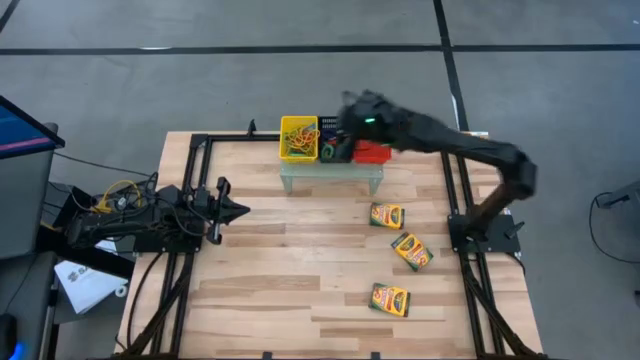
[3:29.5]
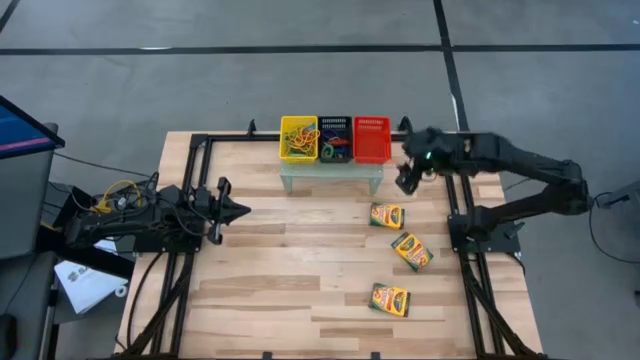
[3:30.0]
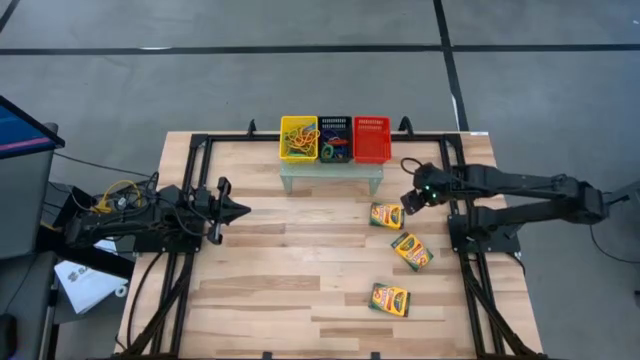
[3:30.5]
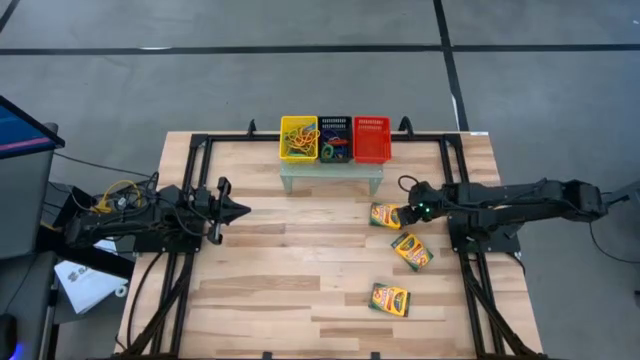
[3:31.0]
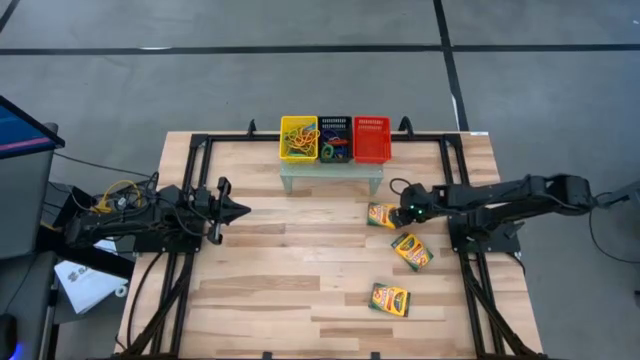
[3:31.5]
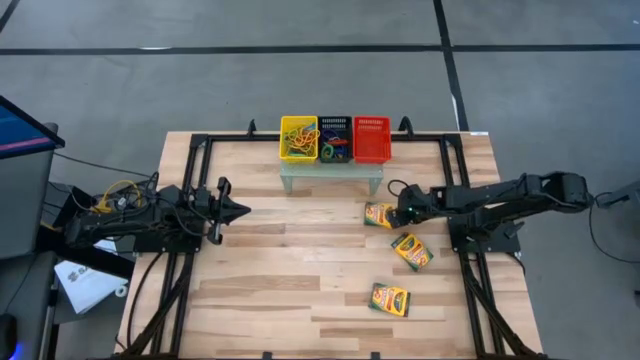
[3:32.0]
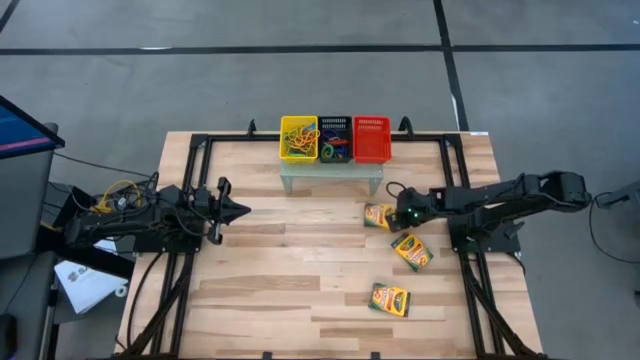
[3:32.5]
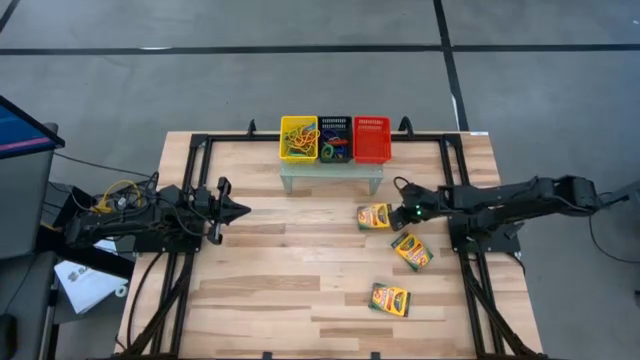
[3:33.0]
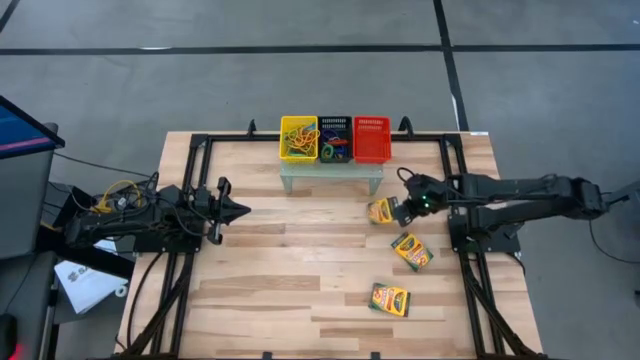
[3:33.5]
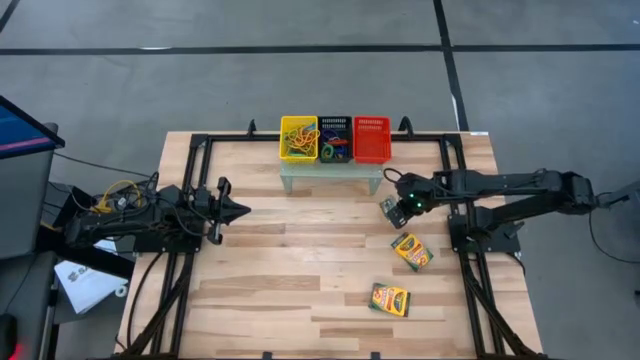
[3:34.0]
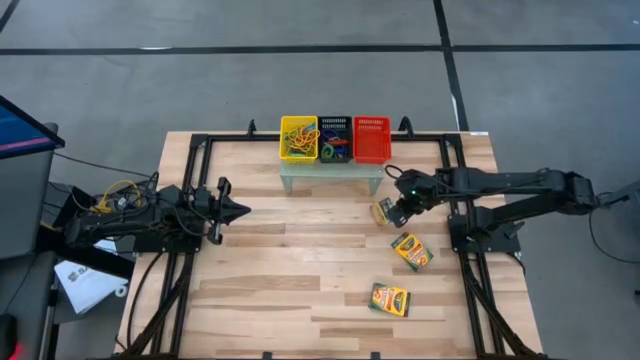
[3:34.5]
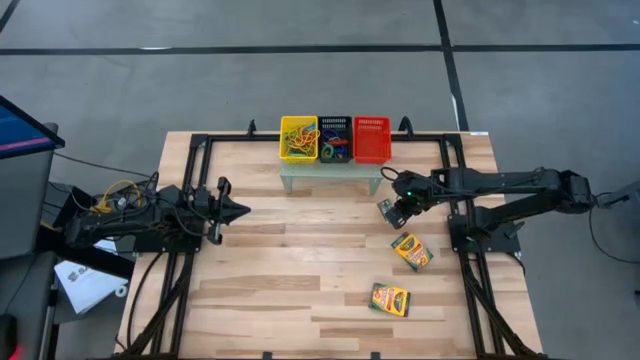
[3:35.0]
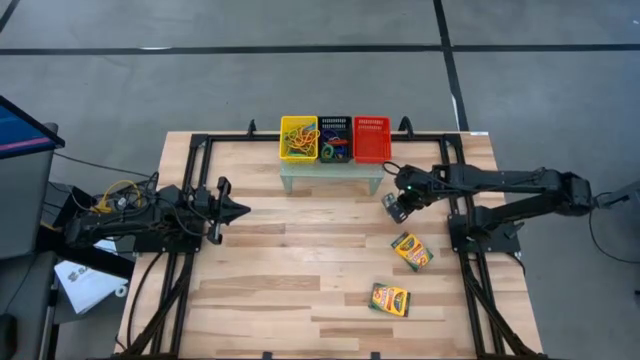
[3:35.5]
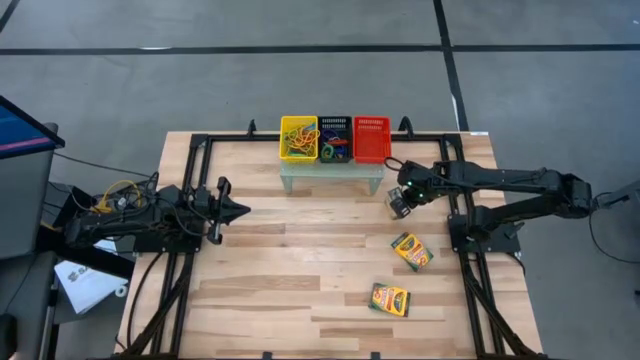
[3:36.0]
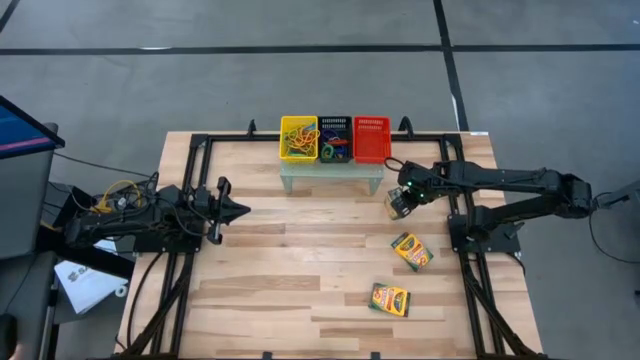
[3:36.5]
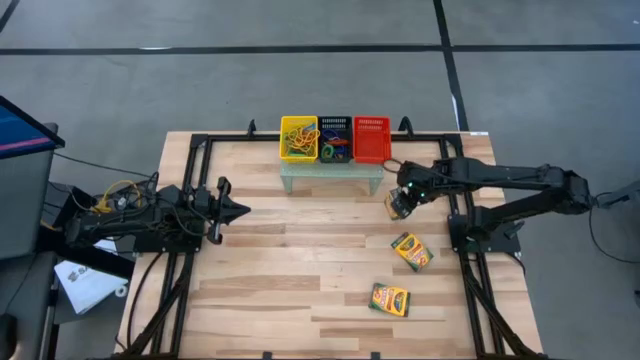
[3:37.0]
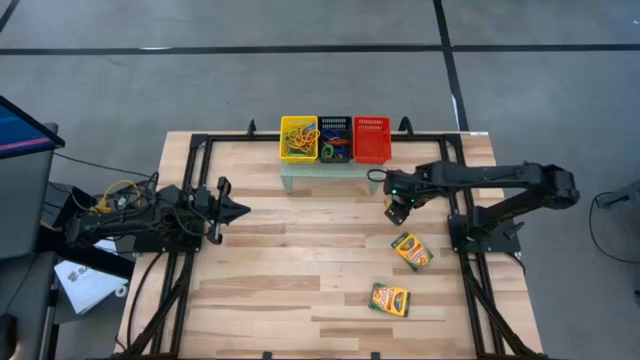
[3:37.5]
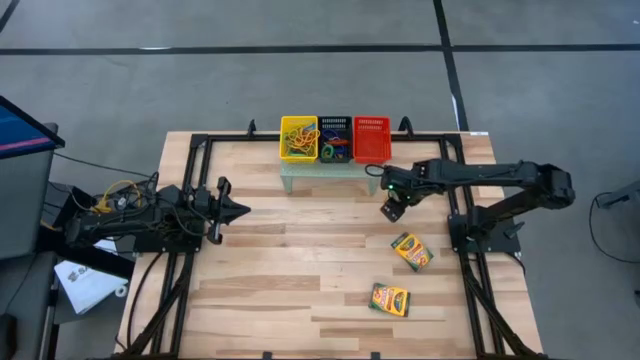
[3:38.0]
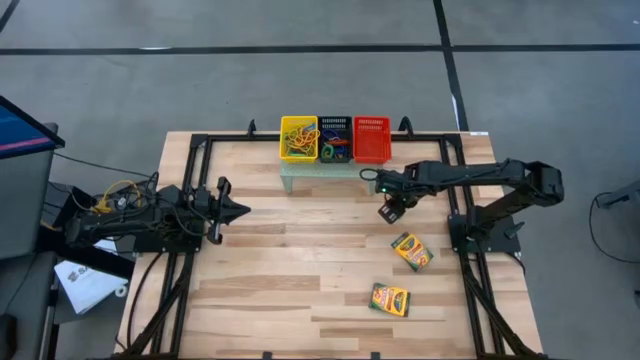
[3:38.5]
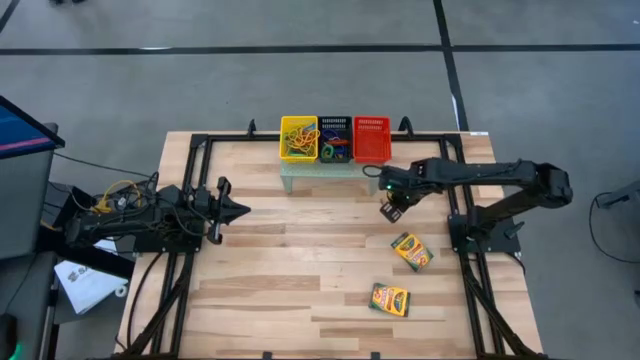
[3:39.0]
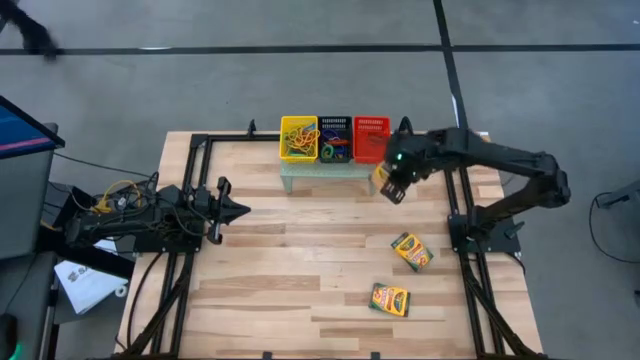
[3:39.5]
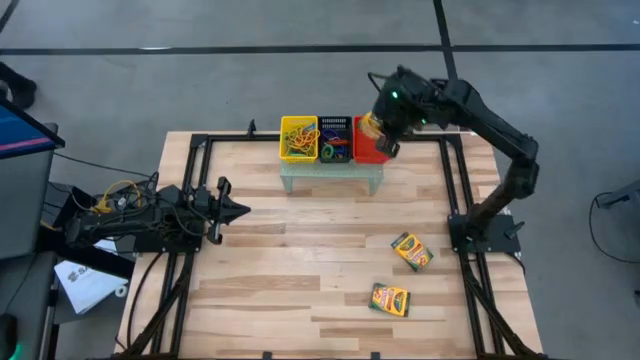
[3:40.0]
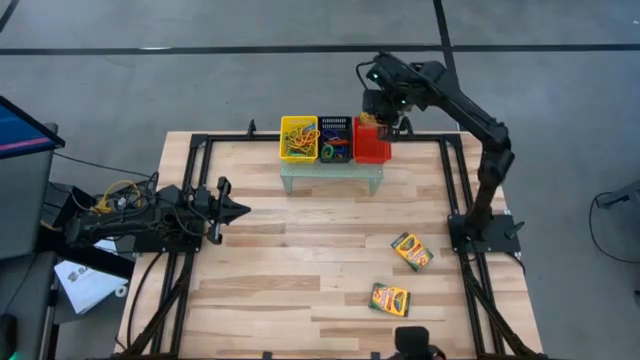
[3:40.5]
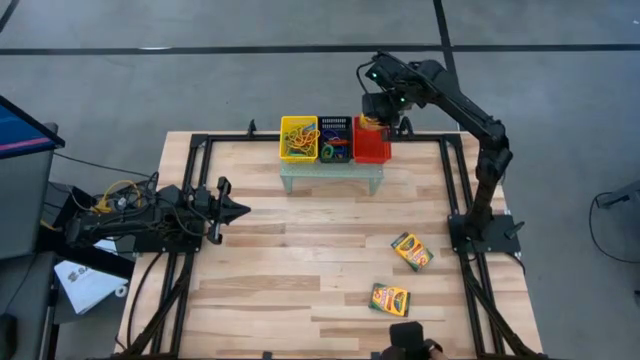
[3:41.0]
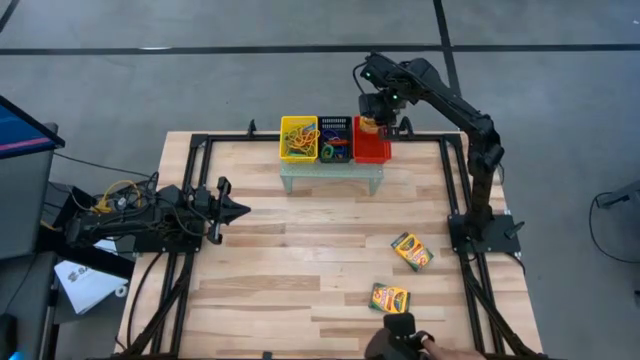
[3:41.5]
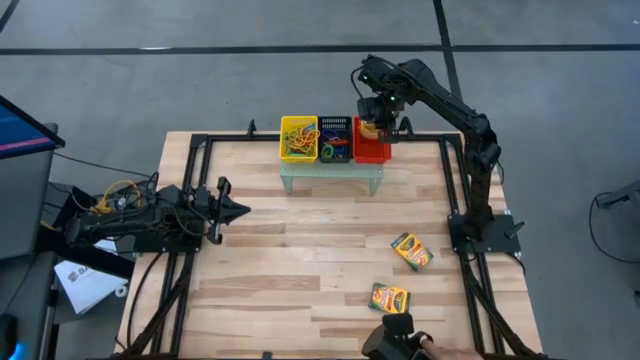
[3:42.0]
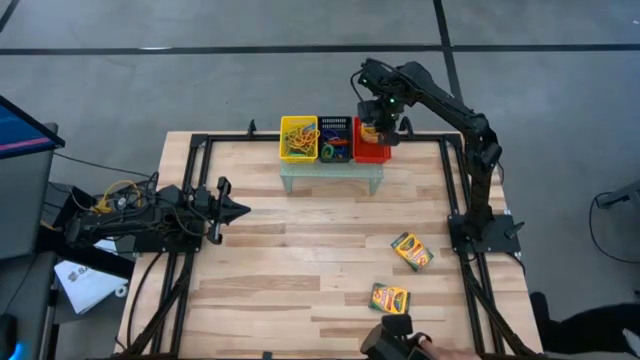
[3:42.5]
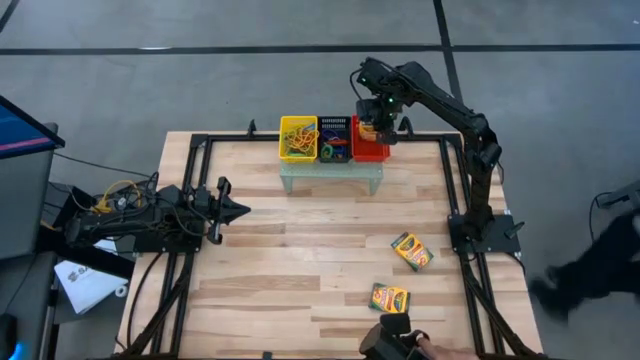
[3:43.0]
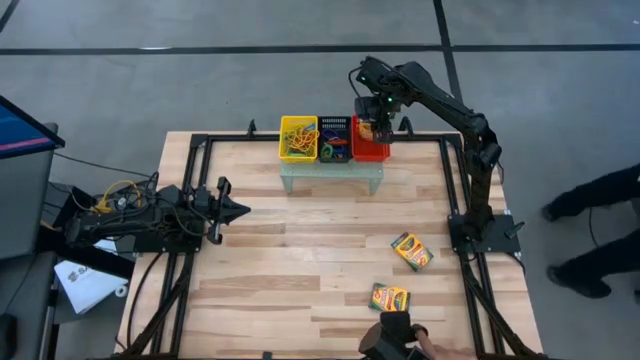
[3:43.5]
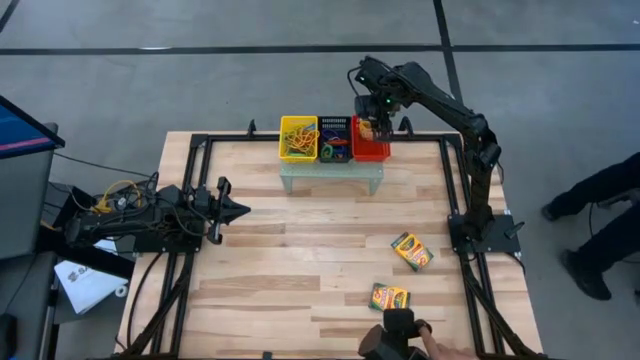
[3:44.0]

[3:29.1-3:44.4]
Task: Pick & Place Office Desk Supplies
Put the top yellow crayon box into the red bin on the shelf

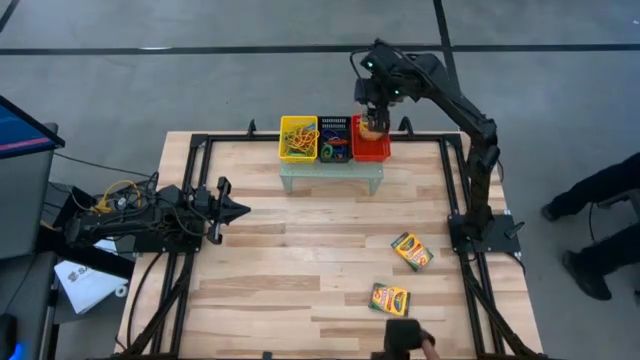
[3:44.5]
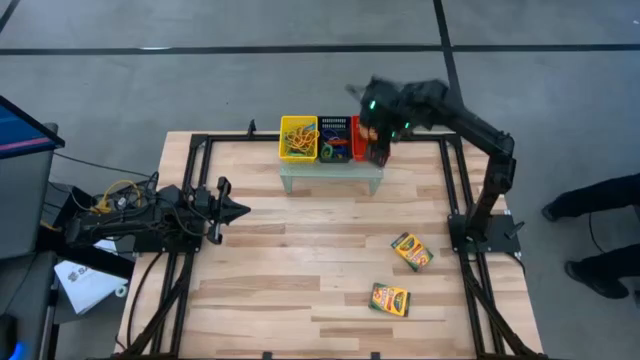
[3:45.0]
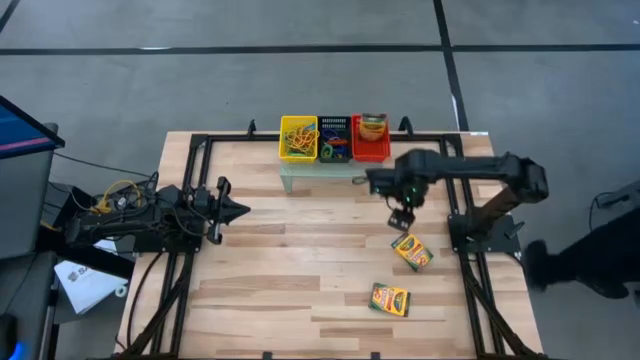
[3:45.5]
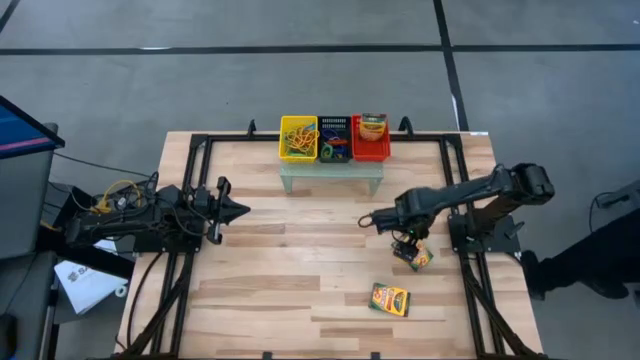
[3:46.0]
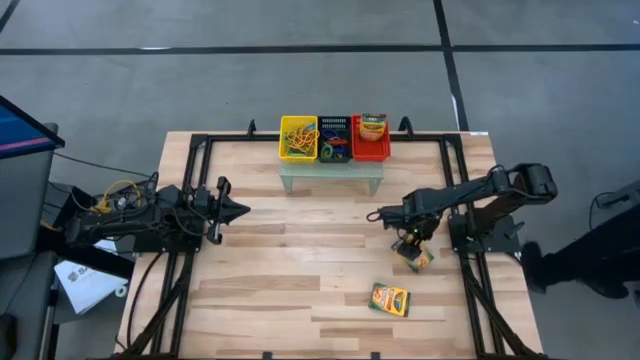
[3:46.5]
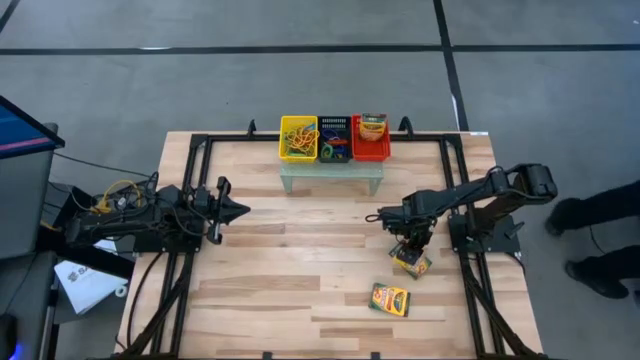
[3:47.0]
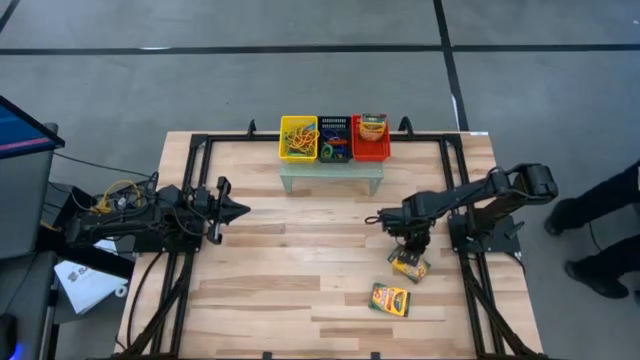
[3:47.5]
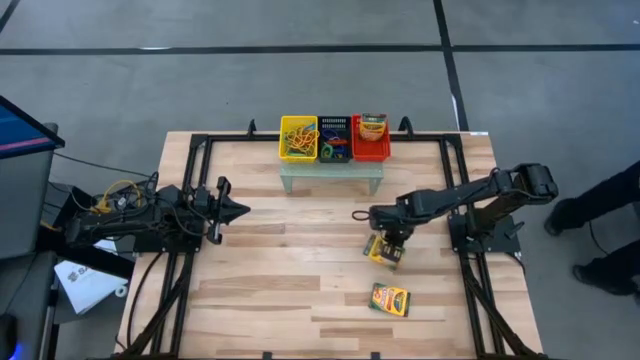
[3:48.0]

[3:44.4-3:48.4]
Put the top yellow crayon box into the red bin on the shelf

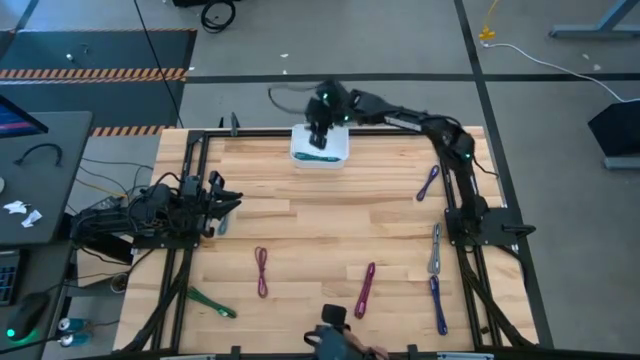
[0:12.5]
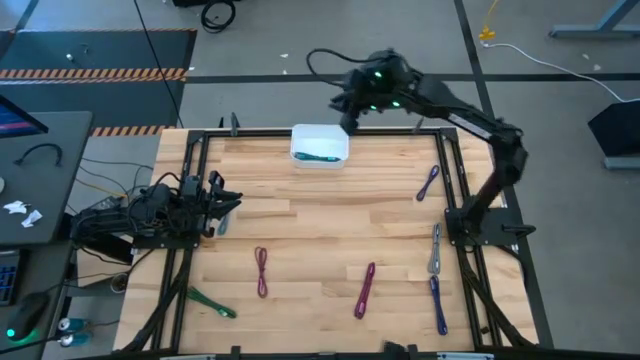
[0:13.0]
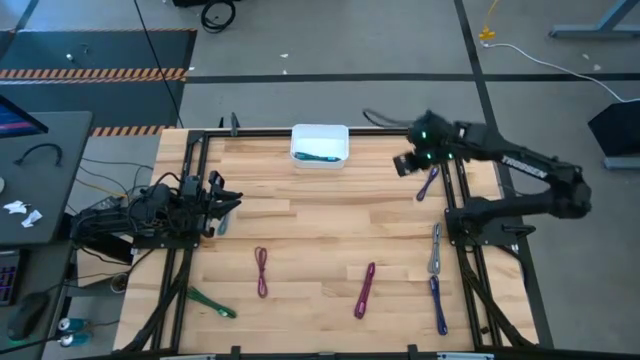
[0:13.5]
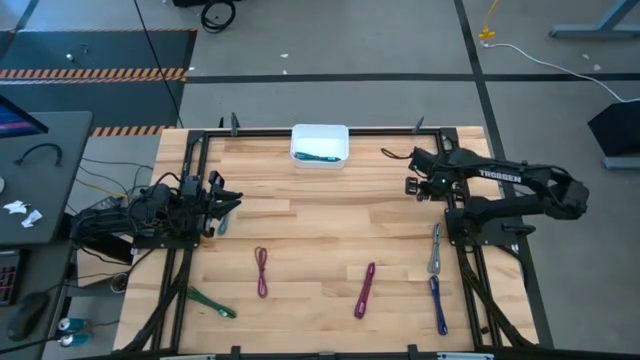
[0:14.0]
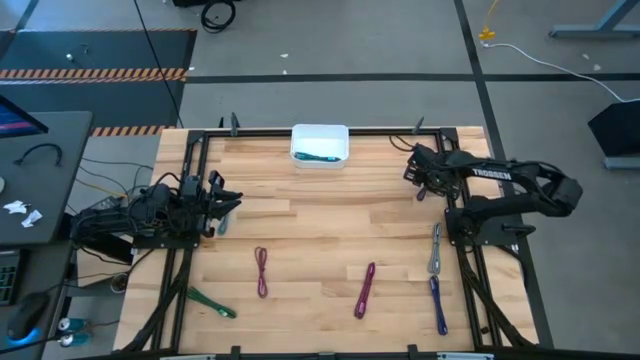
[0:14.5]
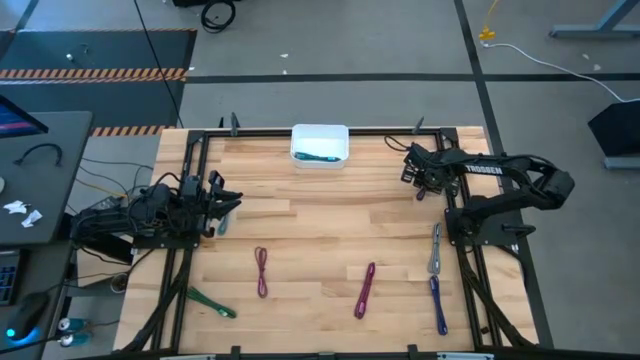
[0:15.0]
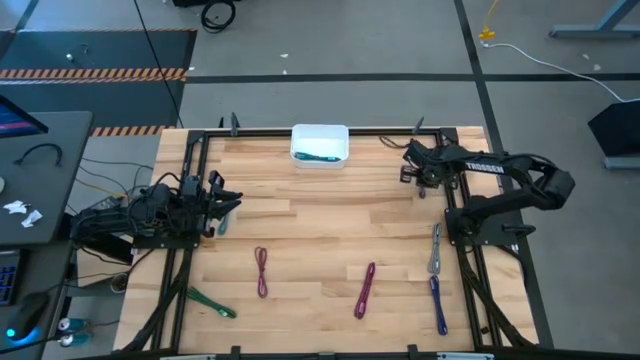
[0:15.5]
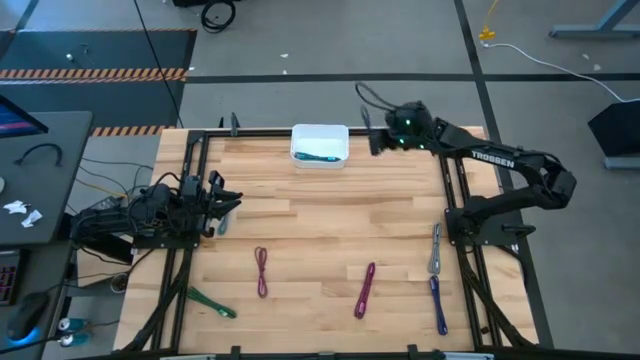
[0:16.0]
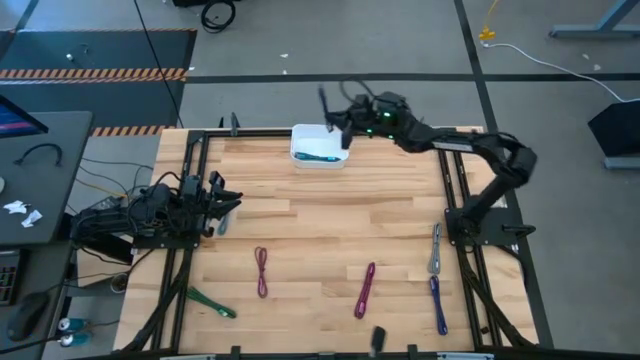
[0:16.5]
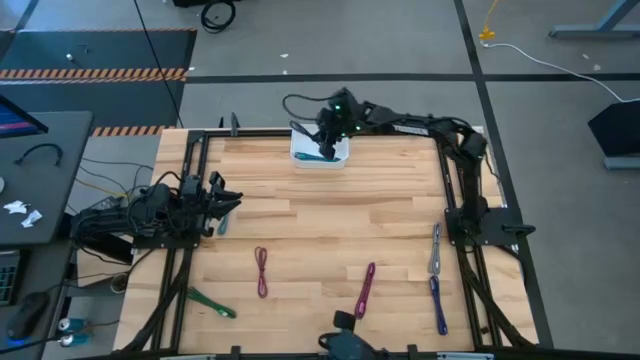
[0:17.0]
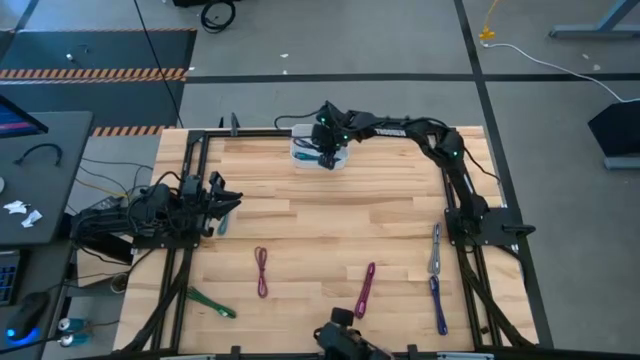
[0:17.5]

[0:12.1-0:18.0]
Task: Pick and place USB-C Cables
Put the top violet charger cable into the white bin
